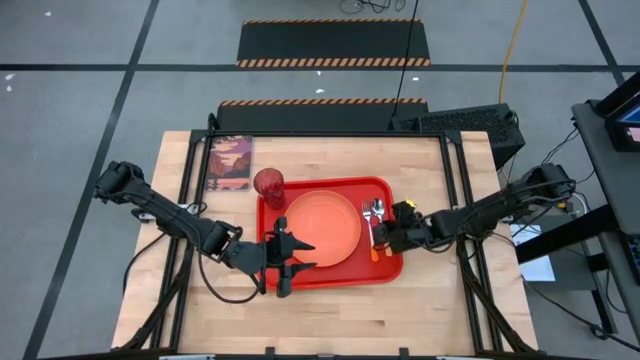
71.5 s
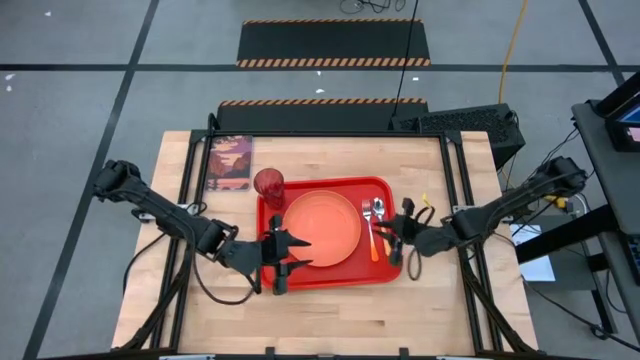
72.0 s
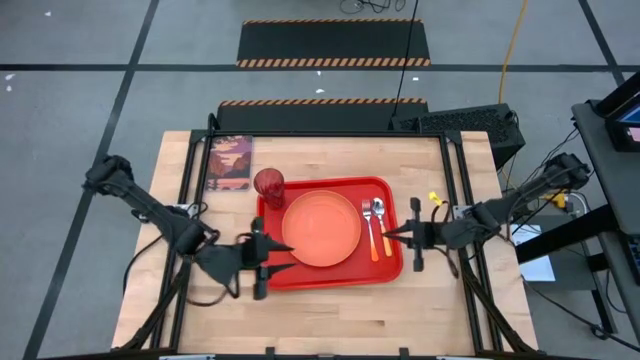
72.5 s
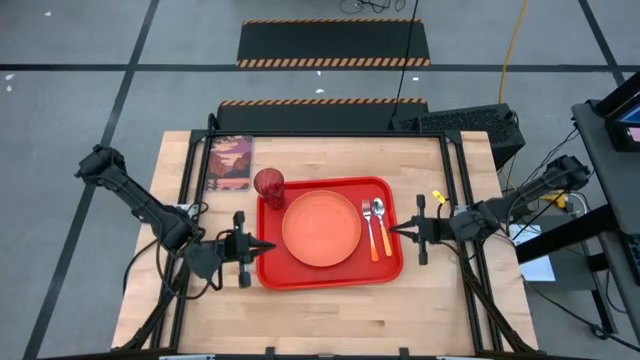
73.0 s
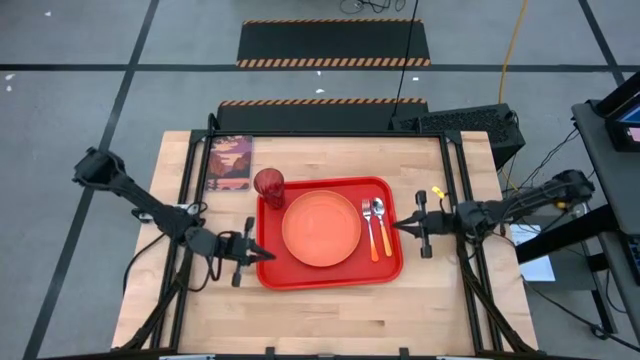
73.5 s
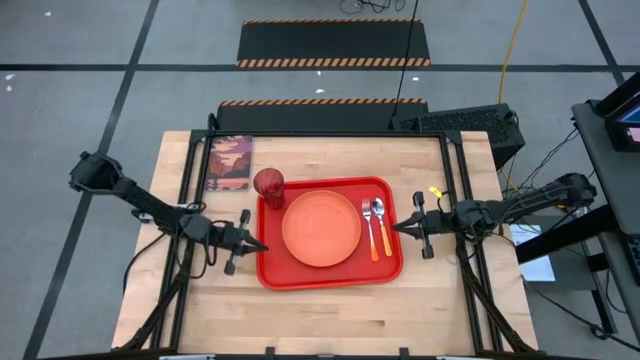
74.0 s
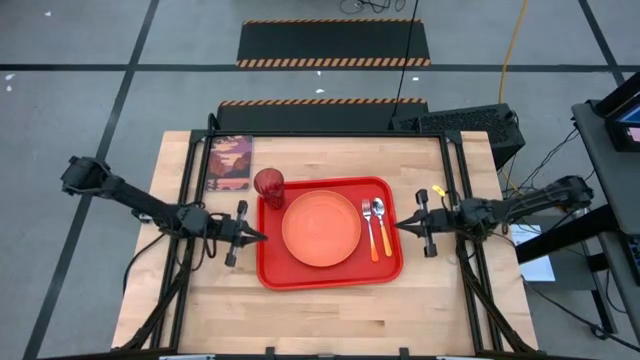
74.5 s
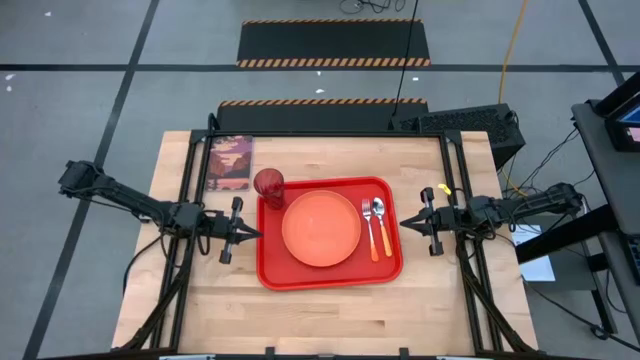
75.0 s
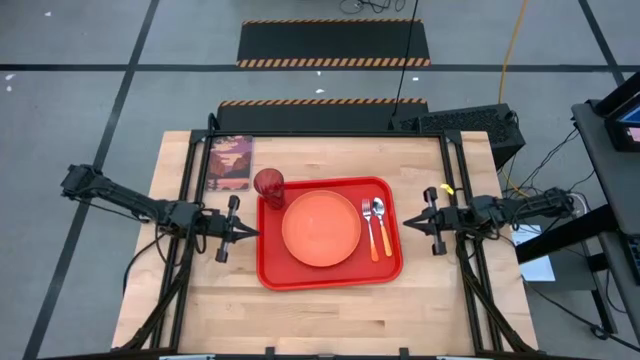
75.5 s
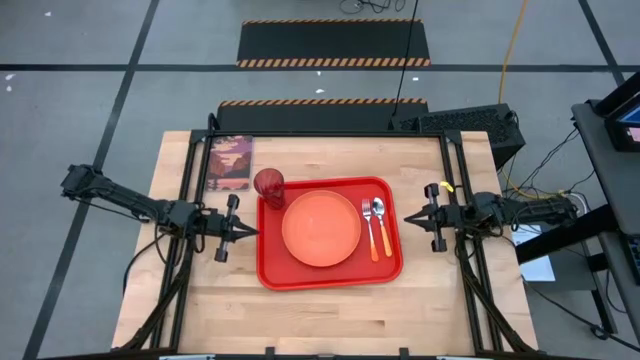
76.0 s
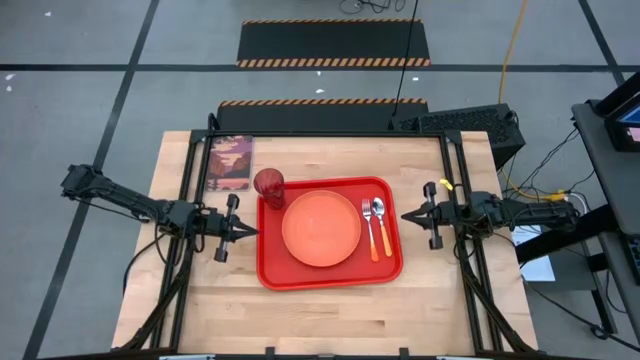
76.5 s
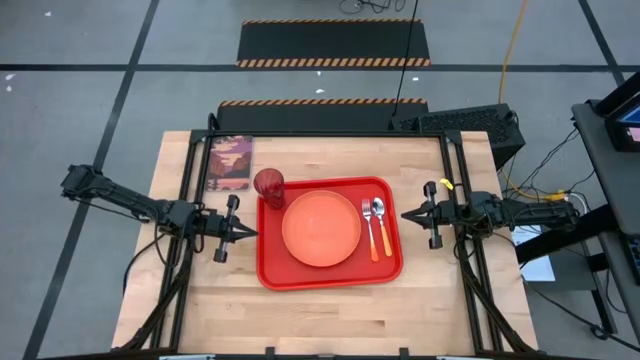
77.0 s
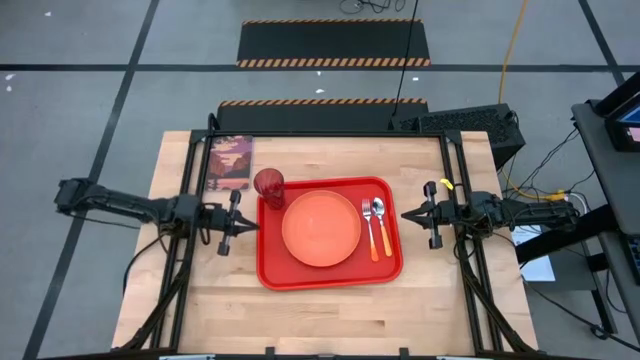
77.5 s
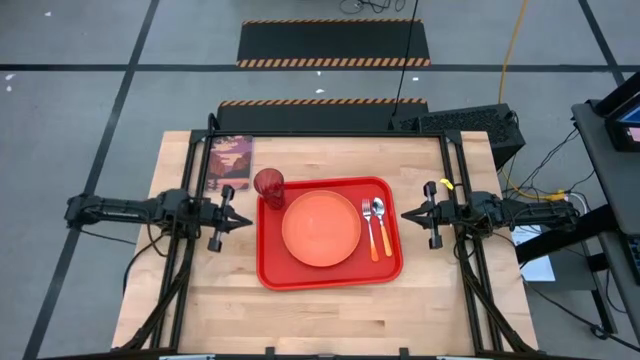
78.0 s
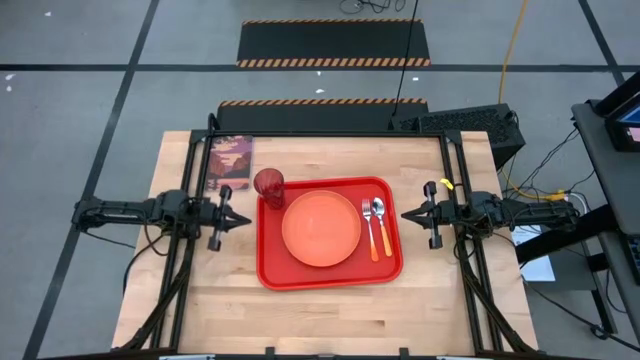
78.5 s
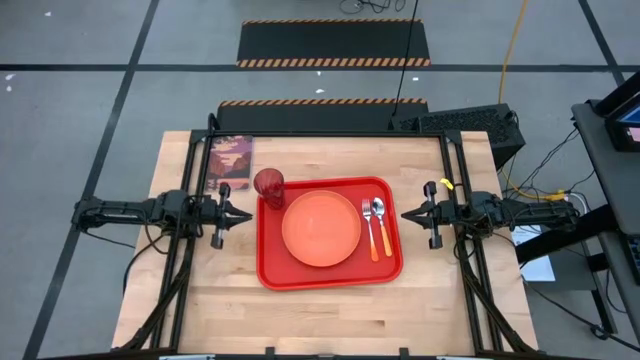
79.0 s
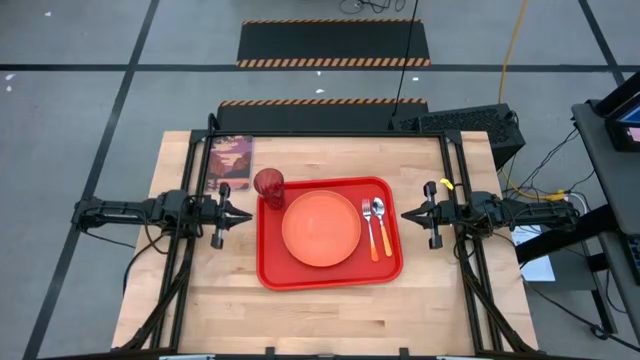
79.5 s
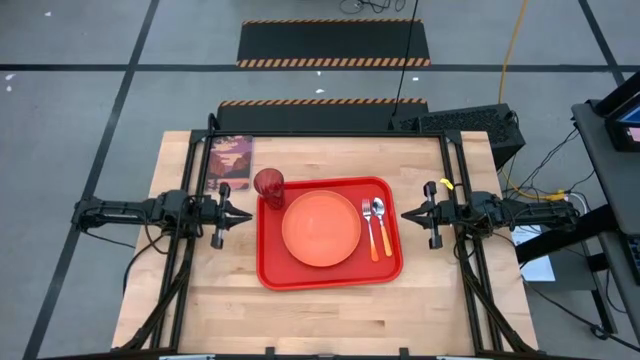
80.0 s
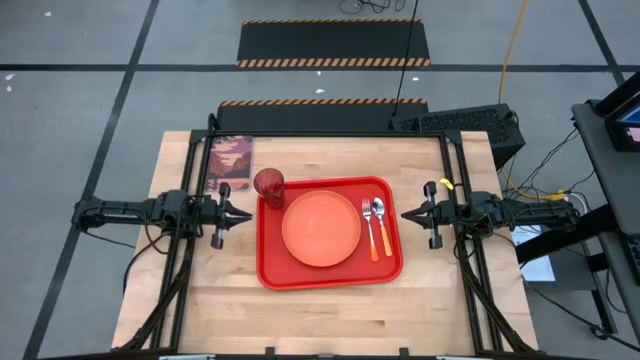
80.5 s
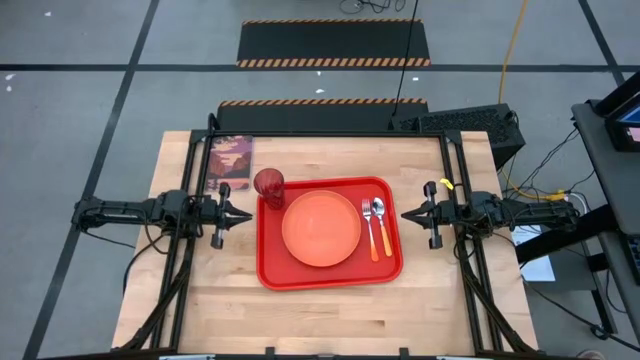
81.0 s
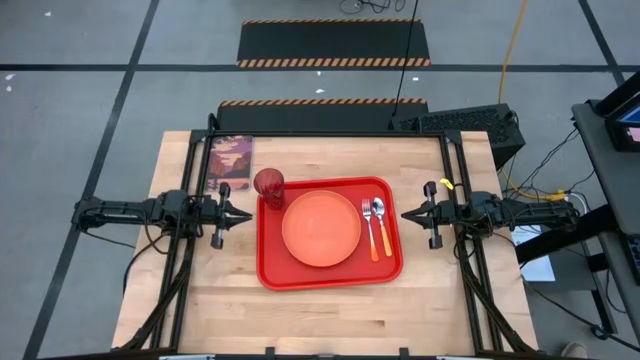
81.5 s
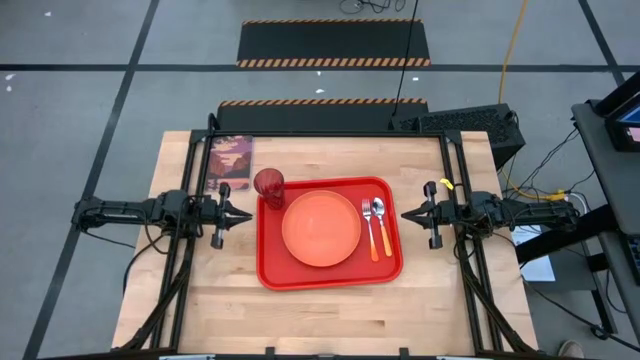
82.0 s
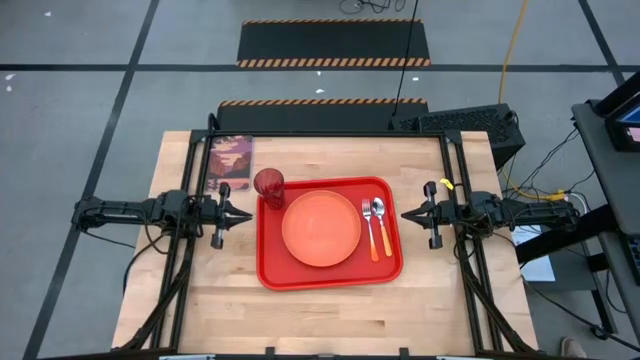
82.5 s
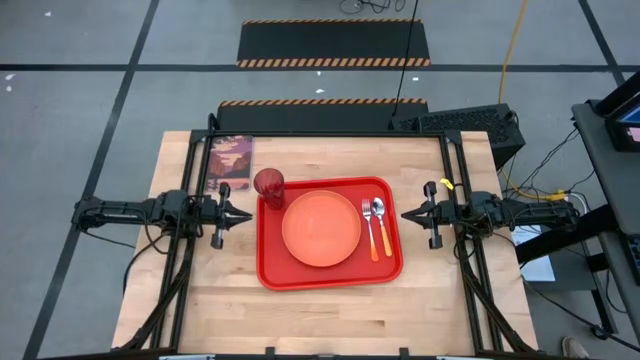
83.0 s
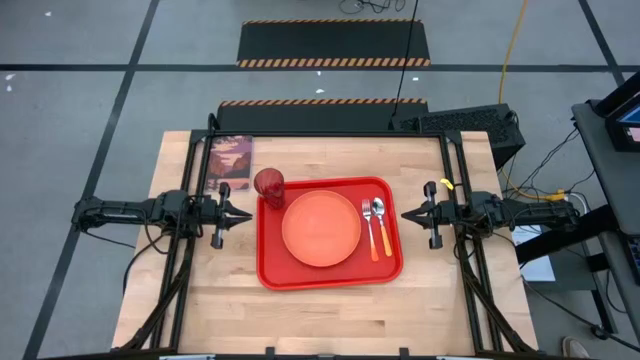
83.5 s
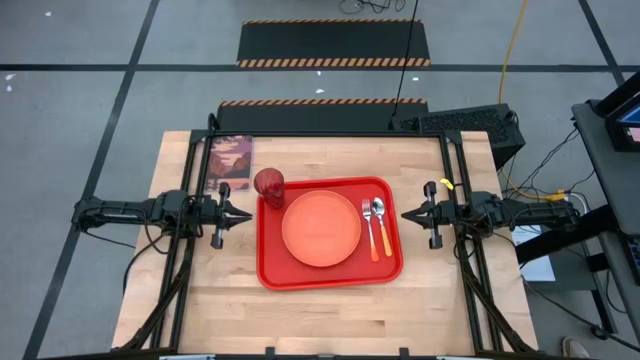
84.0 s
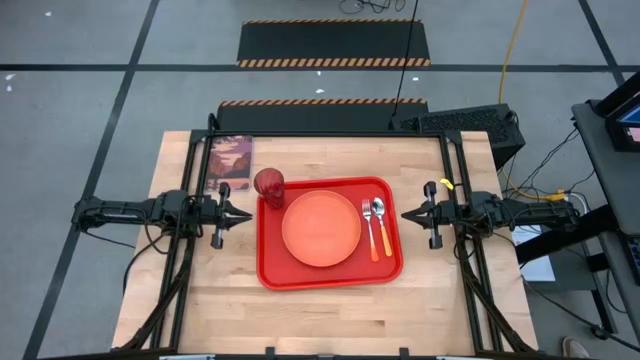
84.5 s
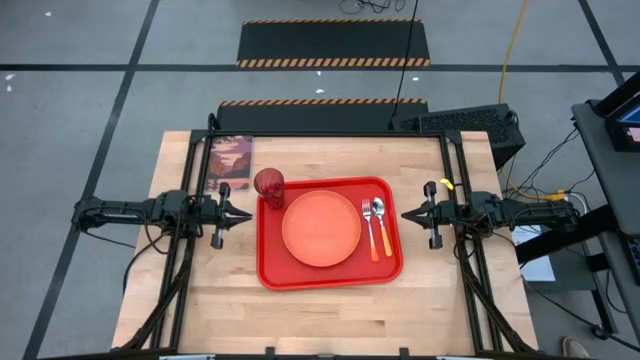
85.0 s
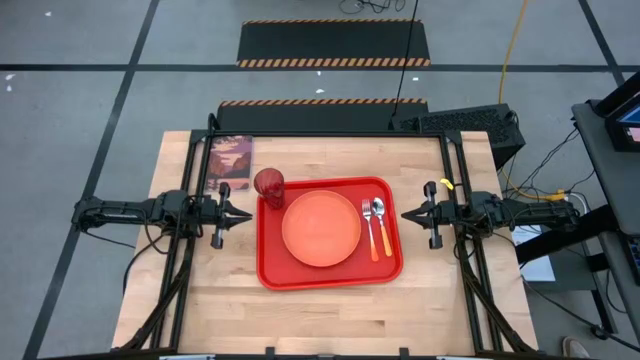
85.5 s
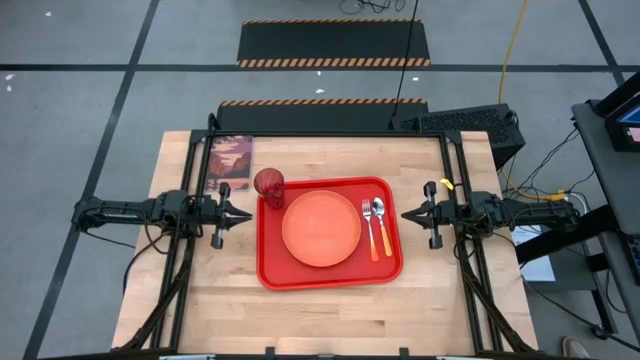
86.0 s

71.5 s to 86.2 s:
Task: Pick and place plate/cup/fork/spoon on tray
Return to Home Position

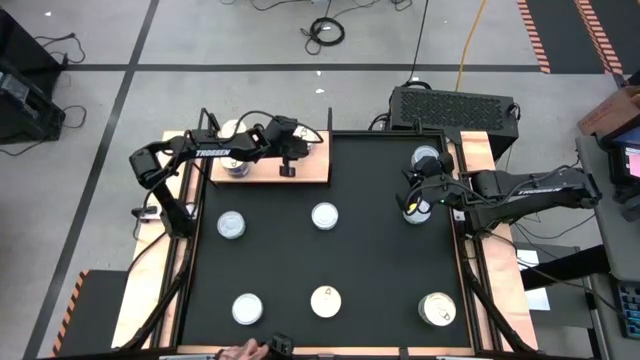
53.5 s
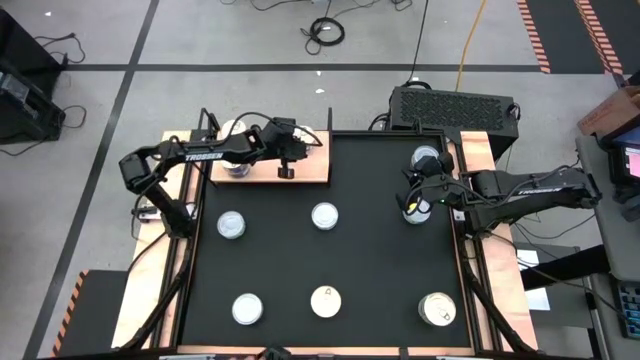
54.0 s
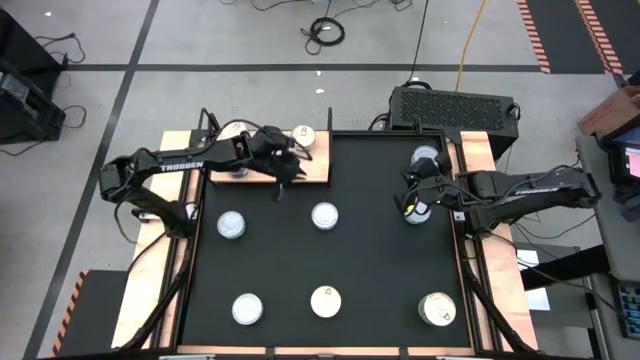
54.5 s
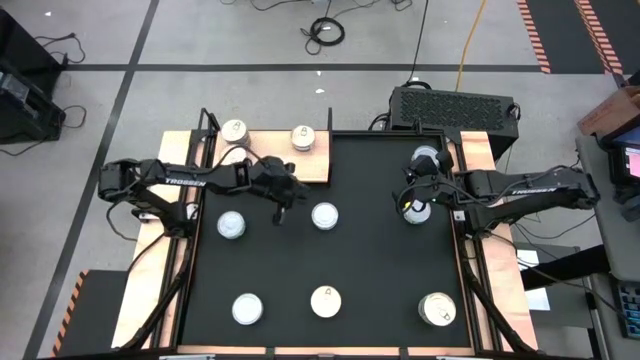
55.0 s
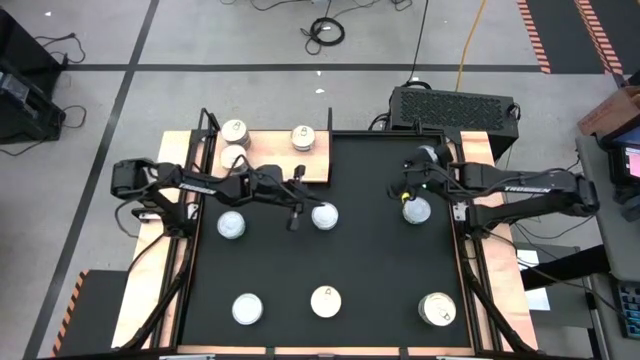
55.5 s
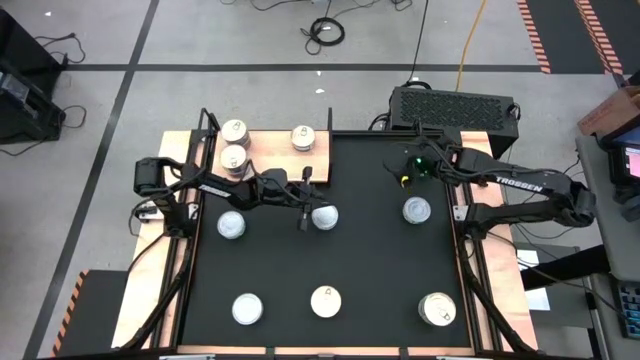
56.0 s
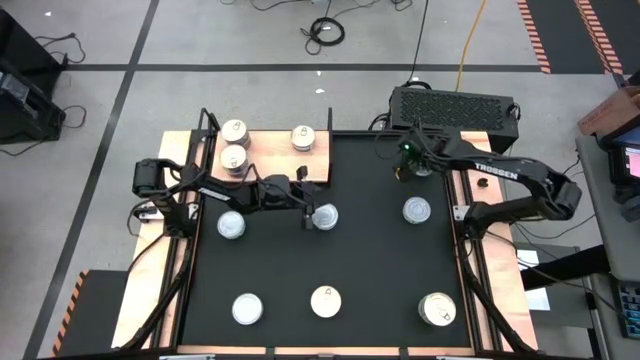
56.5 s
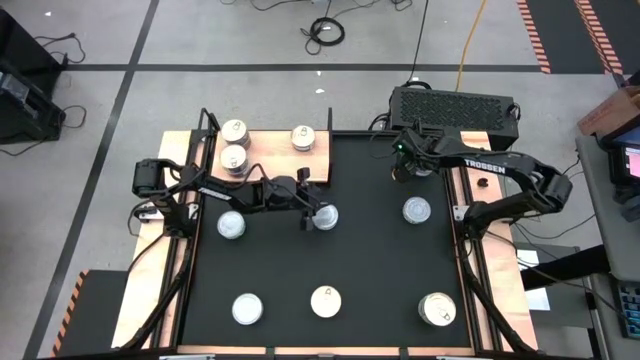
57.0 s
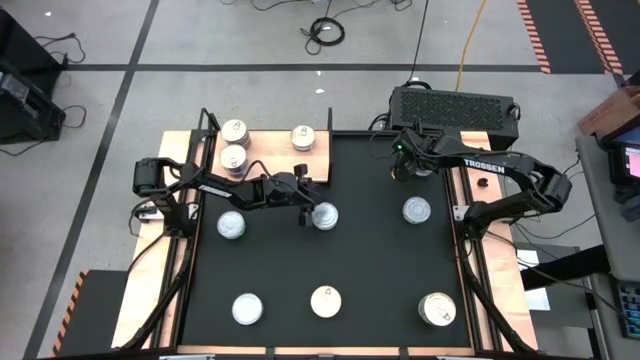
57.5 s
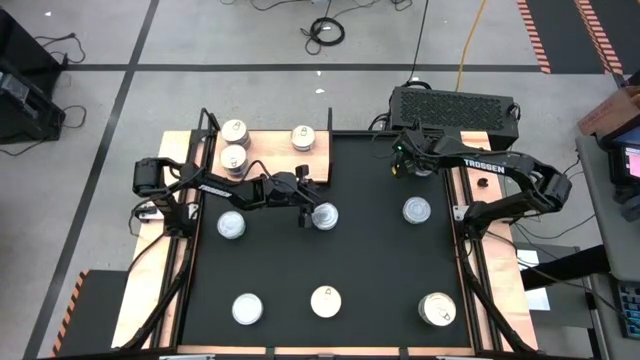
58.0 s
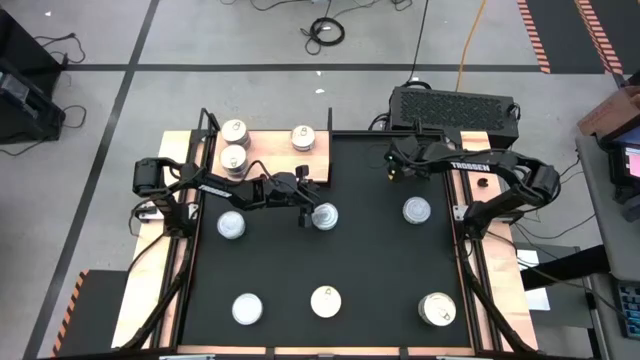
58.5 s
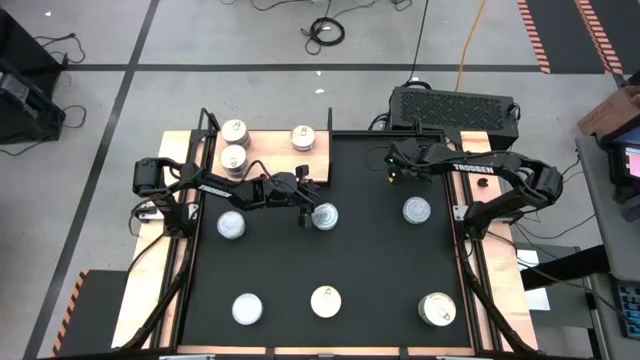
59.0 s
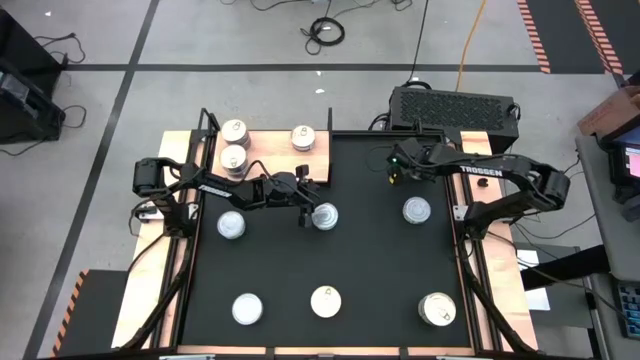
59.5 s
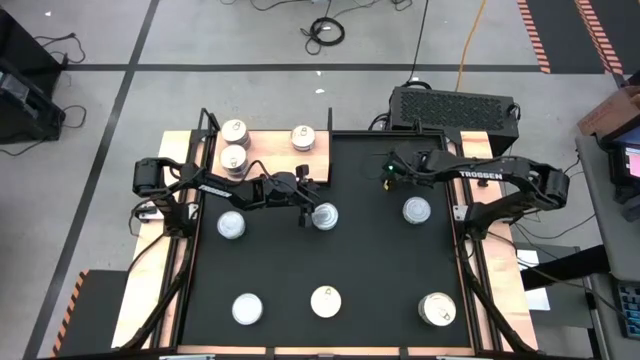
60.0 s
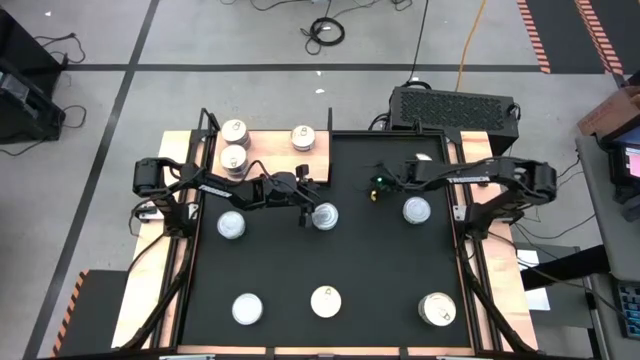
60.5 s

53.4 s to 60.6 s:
Task: Stack canned seafood by type on shelf
Remove the green tuna can from the top of the blue tuna can
